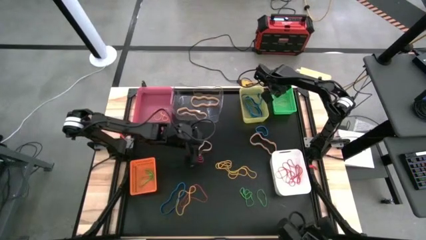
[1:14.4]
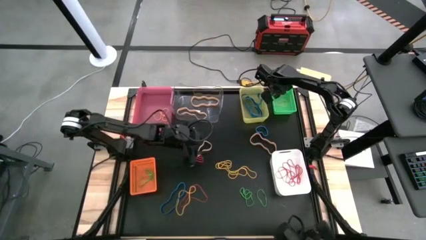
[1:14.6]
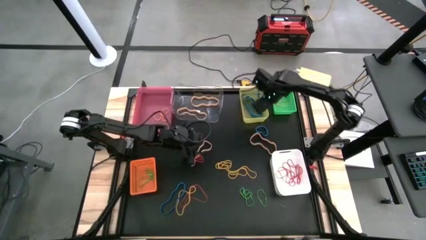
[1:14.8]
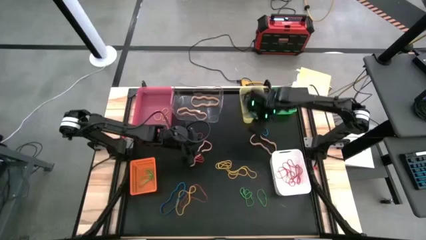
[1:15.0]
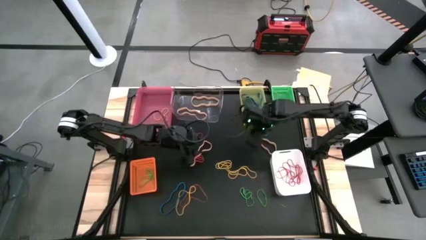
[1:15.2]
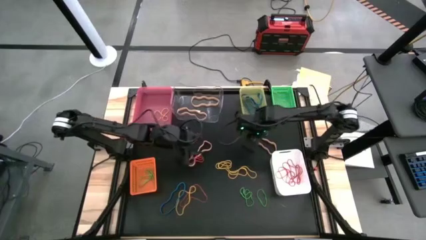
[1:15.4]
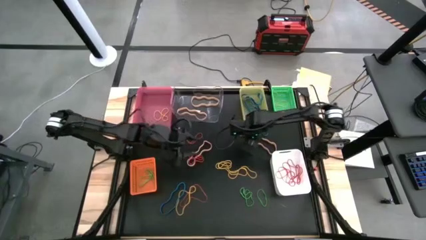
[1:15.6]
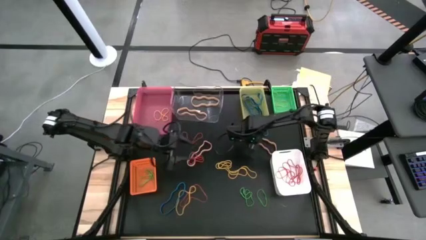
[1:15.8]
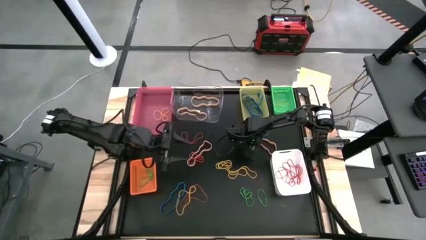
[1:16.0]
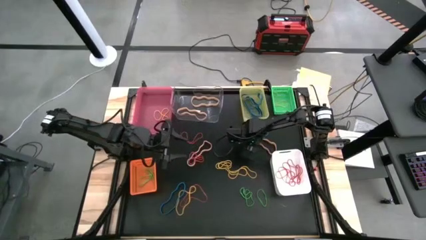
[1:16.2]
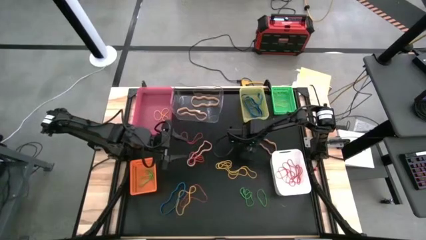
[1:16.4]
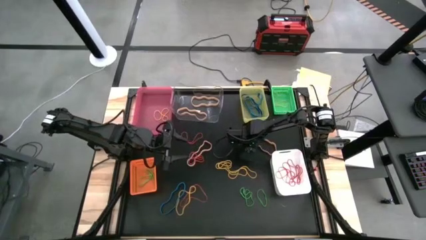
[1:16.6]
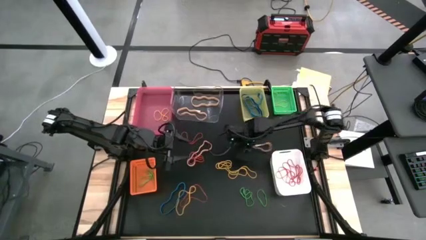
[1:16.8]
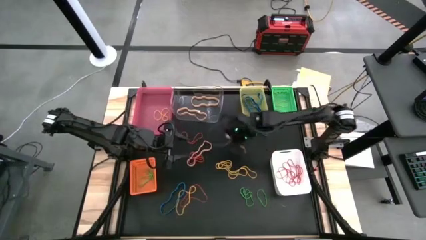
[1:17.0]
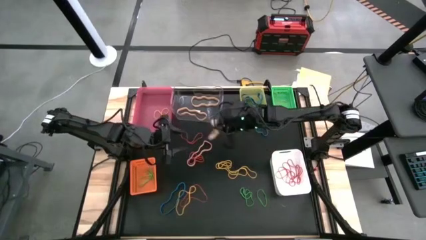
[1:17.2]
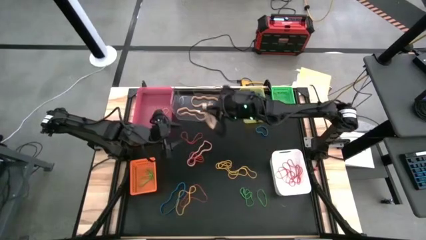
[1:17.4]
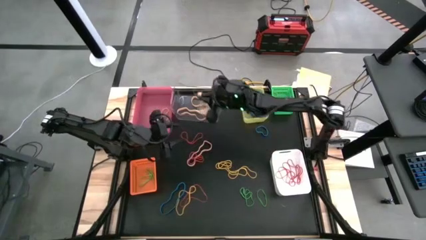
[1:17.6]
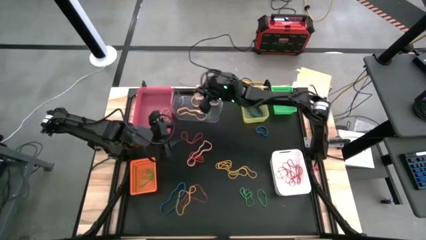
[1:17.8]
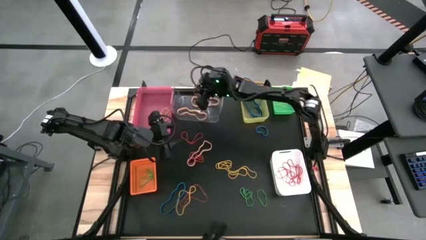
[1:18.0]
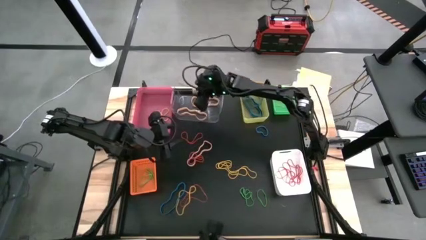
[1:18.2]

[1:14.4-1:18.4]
Task: Sort rubber bands into baskets
Put the brown rubber band into the transparent bin

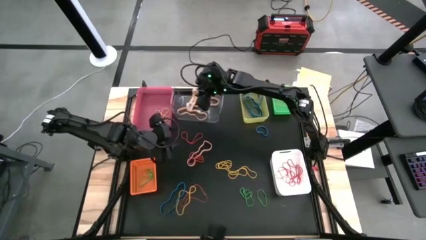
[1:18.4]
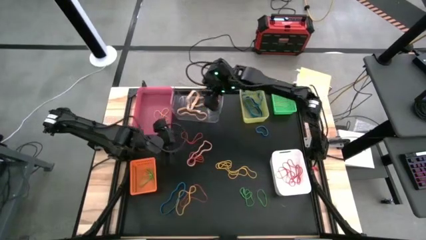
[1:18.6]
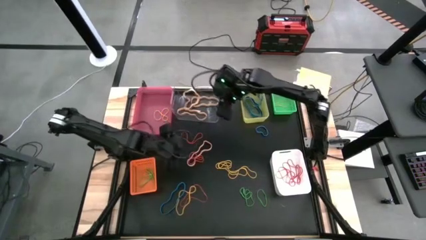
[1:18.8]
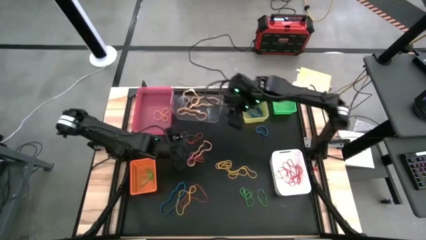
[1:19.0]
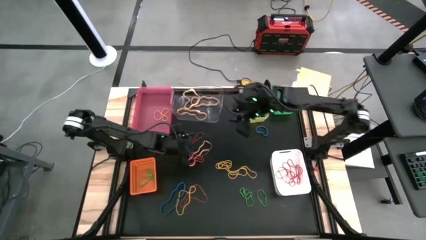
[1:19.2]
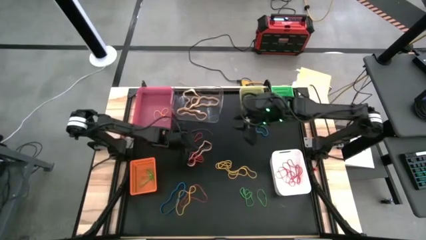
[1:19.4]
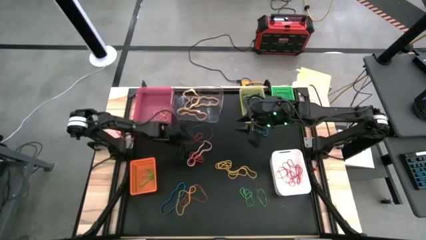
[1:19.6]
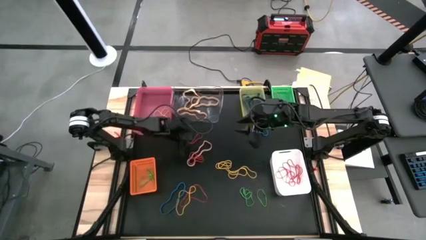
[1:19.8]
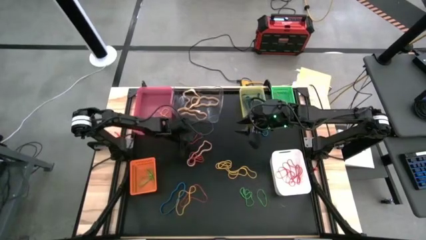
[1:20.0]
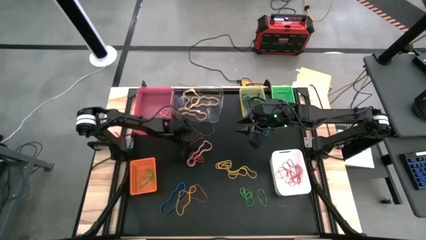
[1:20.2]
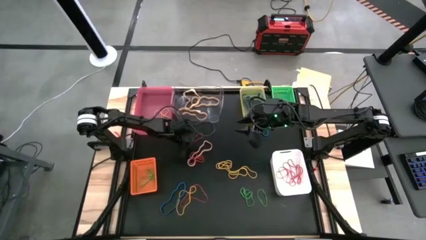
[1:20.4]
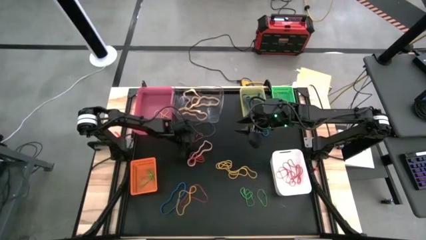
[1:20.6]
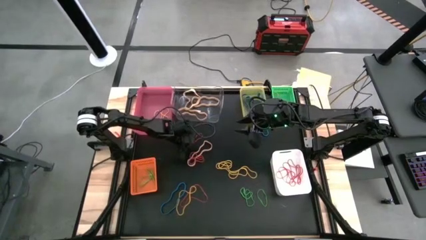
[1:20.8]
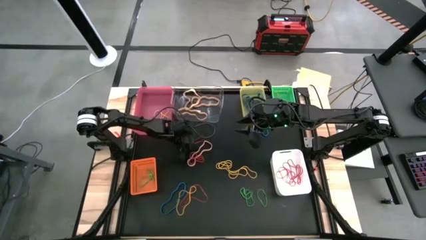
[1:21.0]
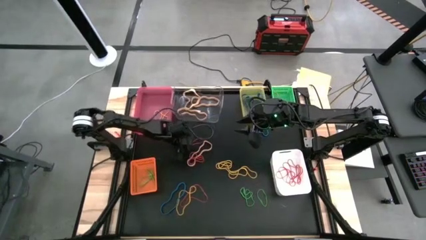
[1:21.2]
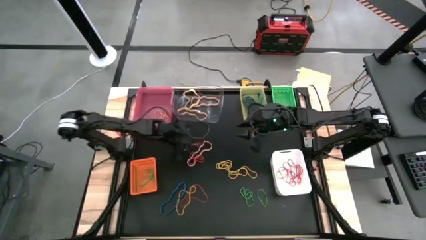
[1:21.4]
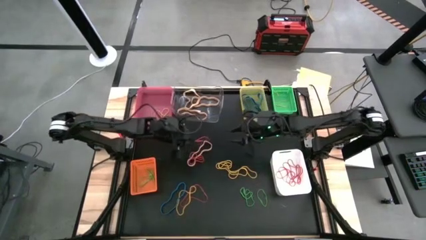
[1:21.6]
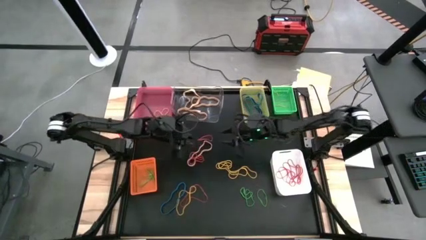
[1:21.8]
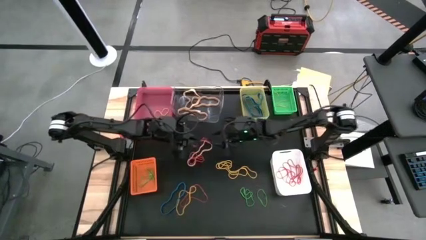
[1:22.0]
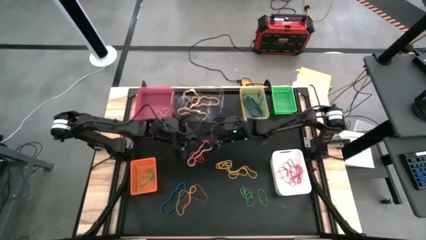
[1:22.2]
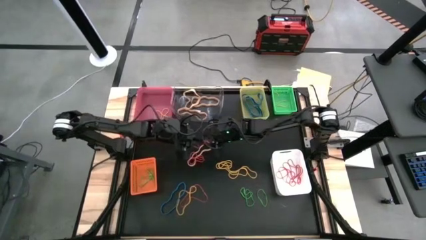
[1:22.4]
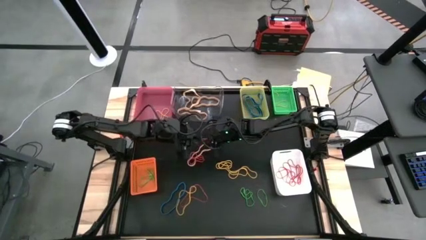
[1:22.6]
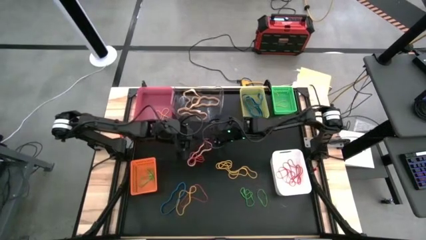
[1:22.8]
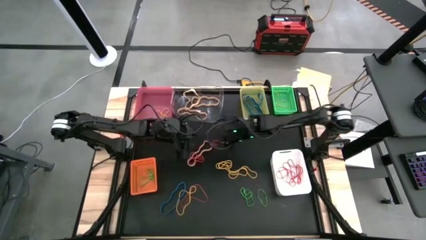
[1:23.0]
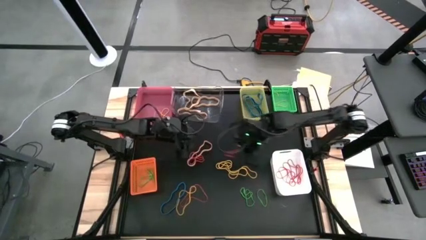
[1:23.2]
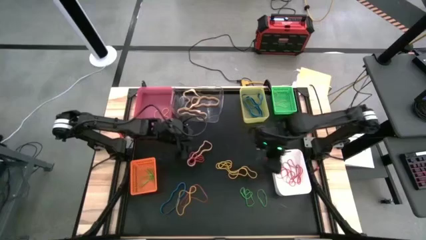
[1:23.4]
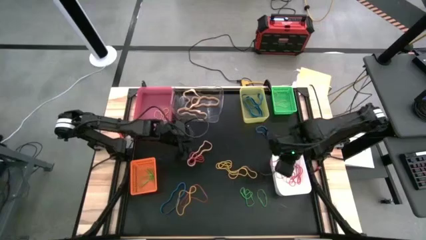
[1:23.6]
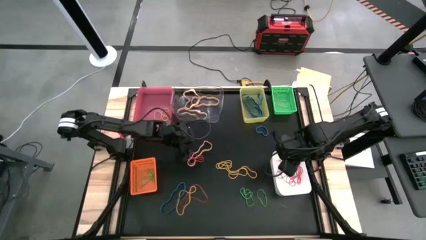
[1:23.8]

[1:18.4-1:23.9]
Put the red rubber band into the white bin

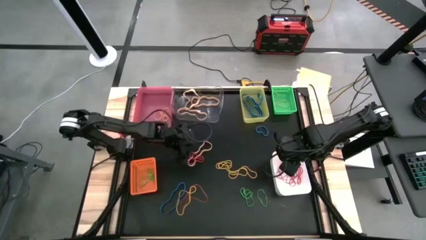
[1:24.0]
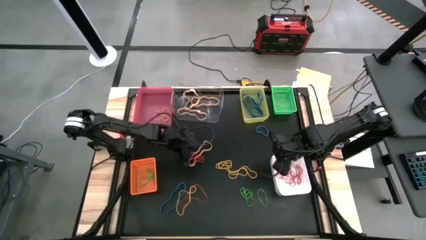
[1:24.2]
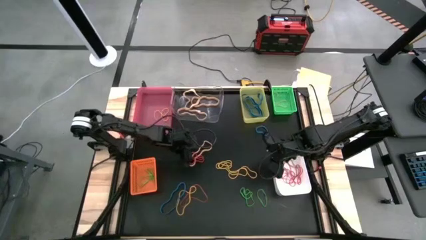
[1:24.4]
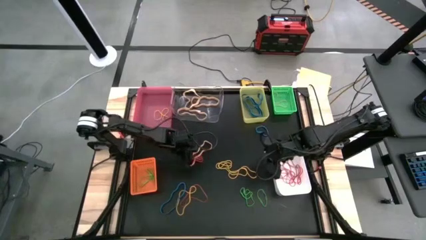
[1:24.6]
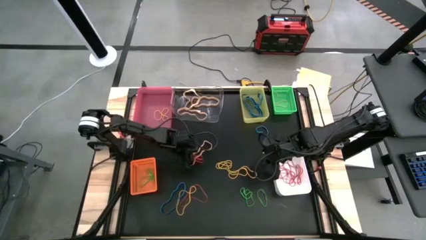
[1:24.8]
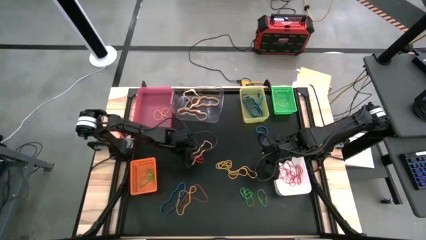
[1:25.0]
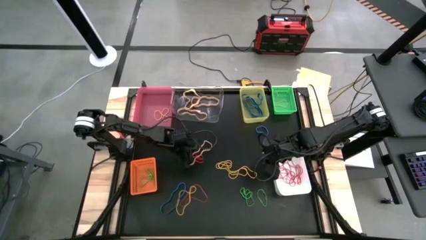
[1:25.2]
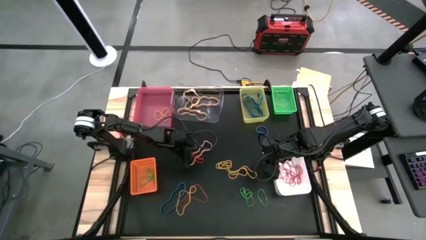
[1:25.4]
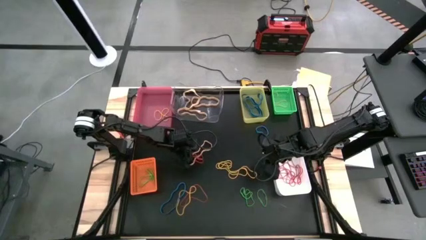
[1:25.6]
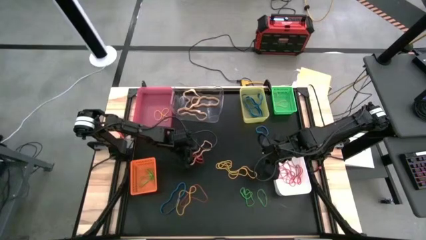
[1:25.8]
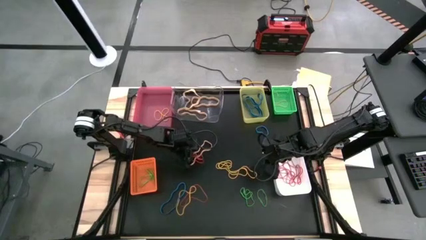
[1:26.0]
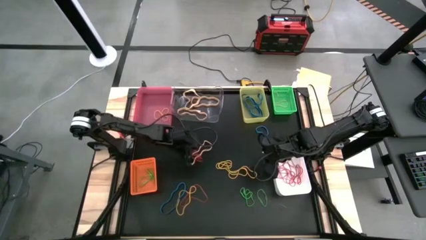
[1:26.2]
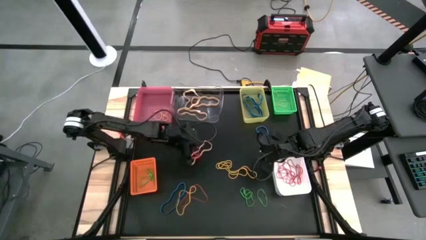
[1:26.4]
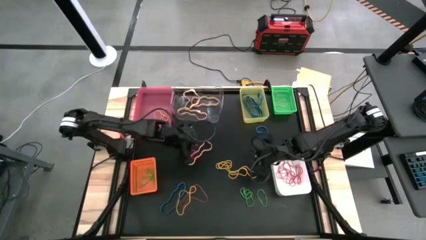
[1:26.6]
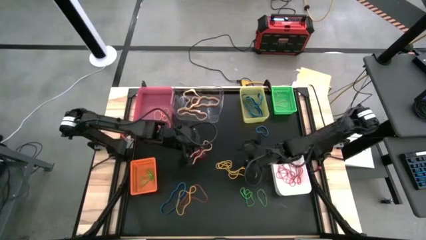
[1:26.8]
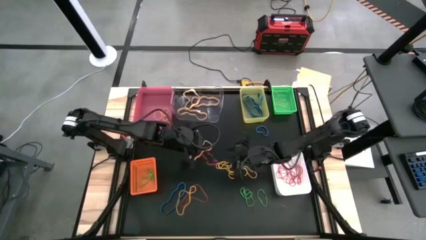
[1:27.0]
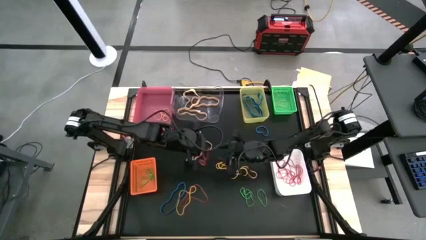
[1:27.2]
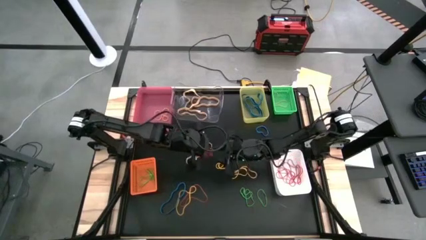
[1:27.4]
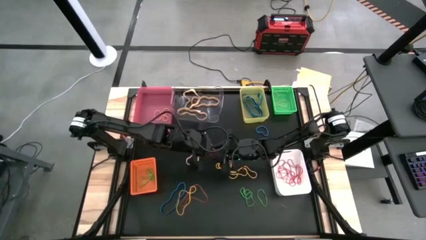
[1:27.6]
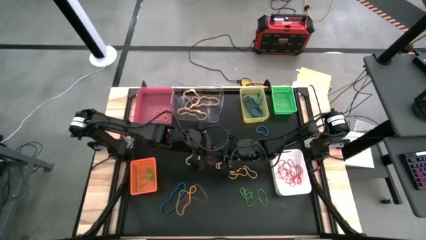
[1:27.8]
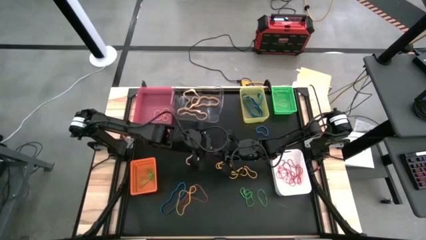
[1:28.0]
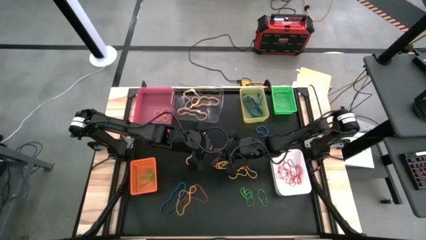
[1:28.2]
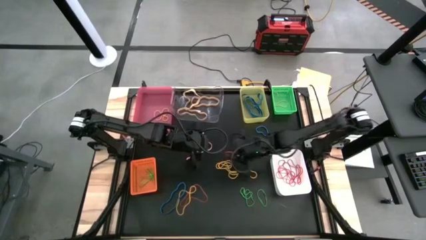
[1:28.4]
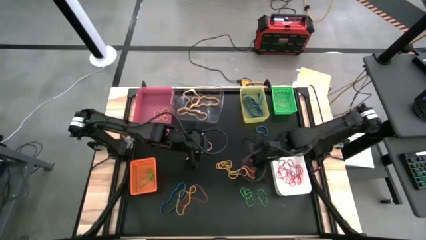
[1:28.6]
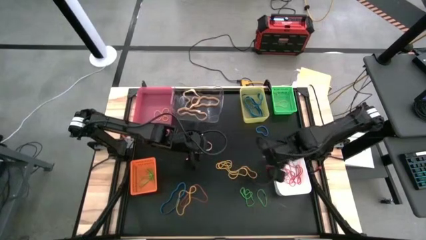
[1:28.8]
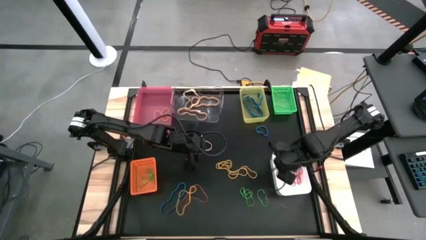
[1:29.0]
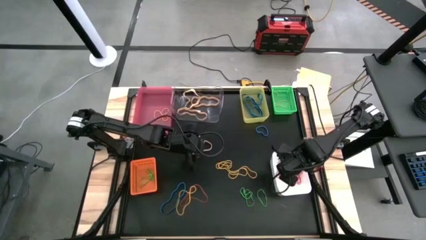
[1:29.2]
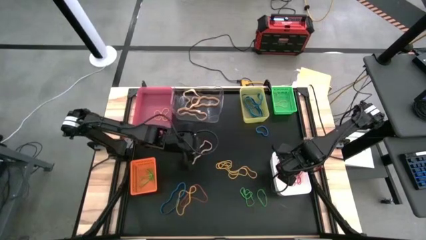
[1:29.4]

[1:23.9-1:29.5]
Put the red rubber band into the white bin

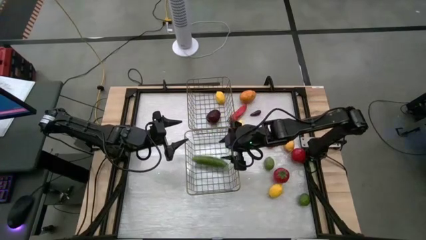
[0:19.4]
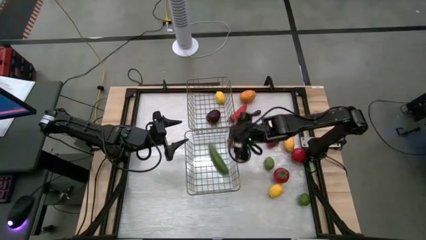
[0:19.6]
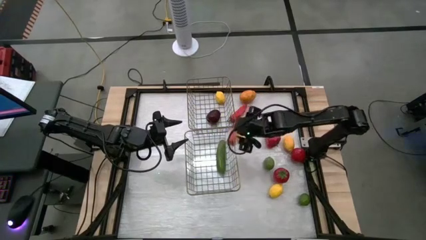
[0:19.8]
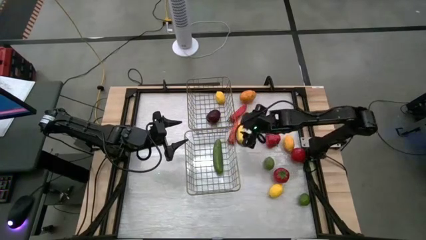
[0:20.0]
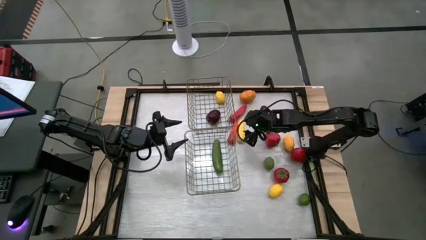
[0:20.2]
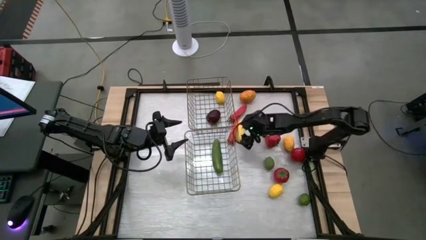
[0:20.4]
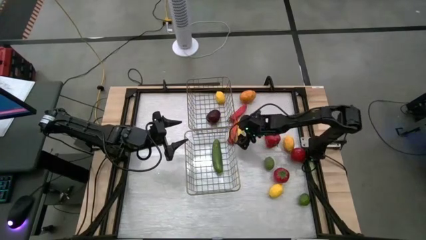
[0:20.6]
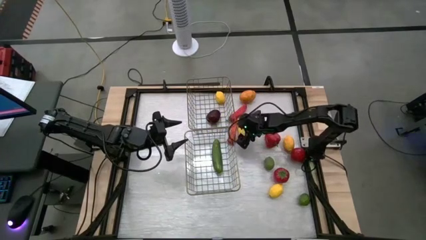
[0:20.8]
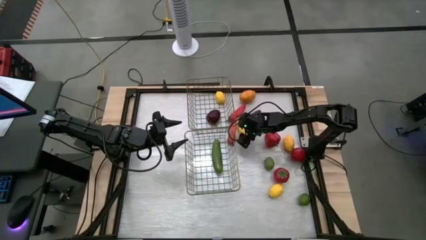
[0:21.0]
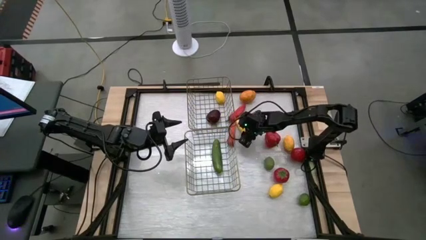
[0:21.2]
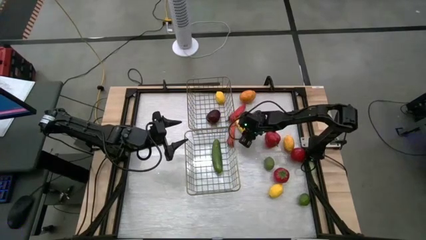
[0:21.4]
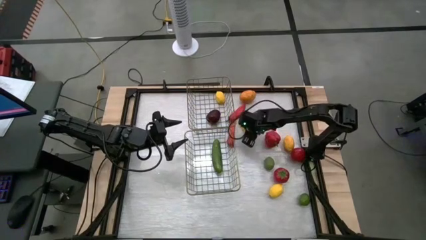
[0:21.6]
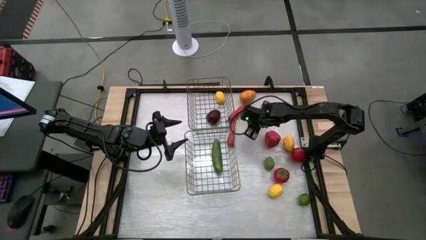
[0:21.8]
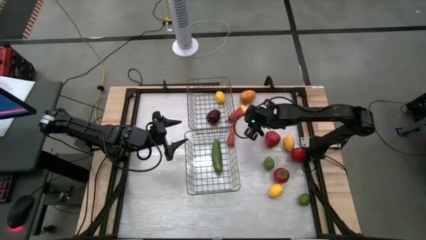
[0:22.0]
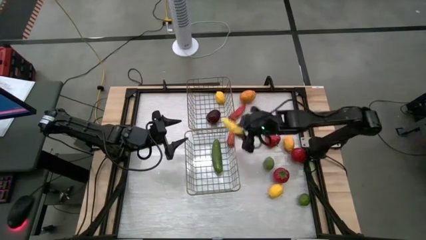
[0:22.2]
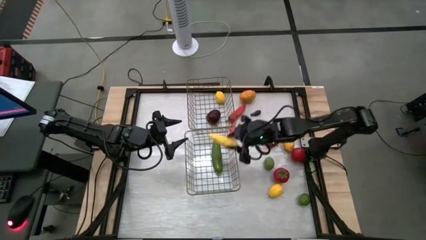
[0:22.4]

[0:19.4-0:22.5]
Task: Sort produce into baskets
Put the yellow corn into the bottom wire basket
